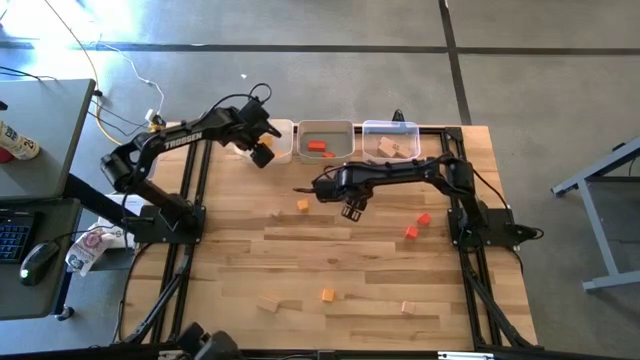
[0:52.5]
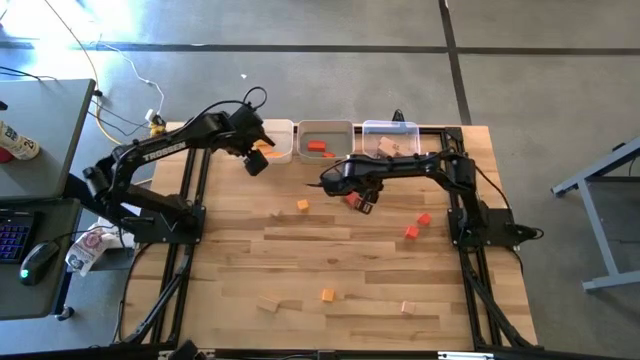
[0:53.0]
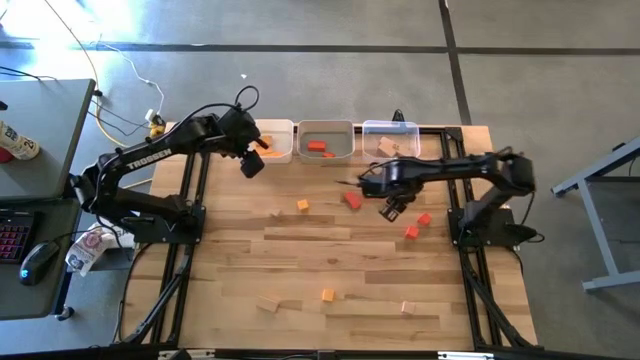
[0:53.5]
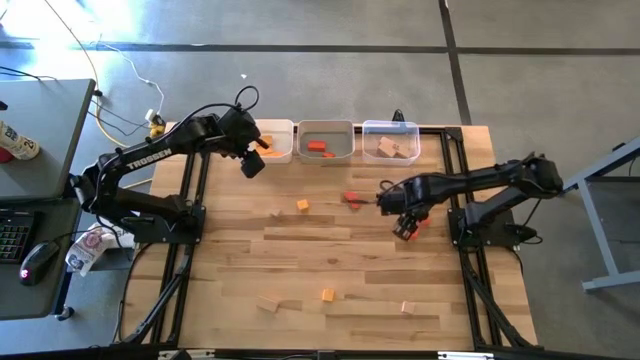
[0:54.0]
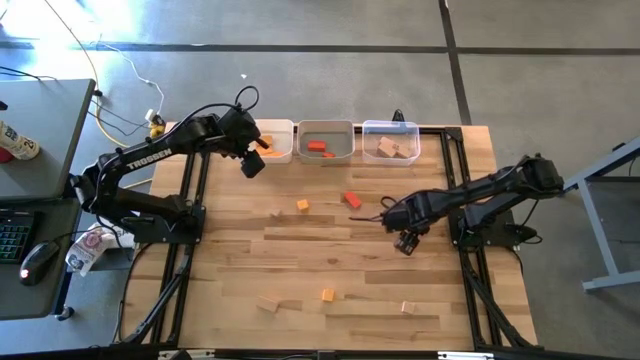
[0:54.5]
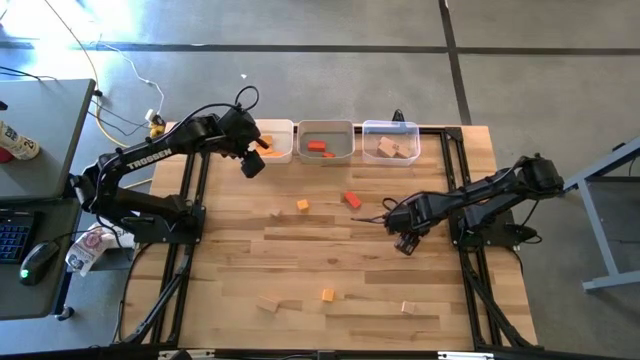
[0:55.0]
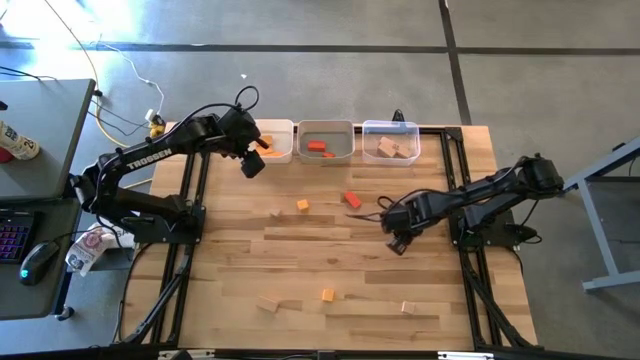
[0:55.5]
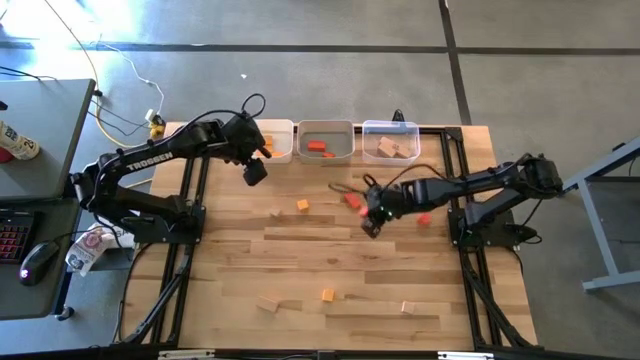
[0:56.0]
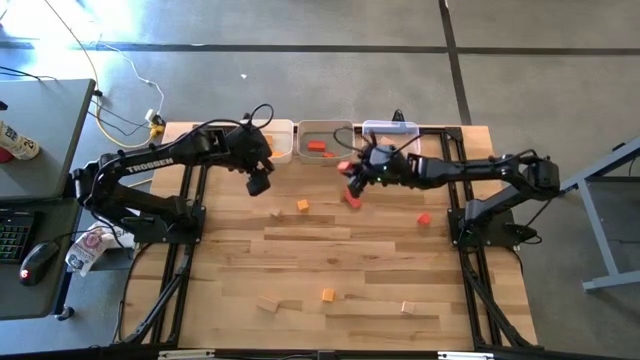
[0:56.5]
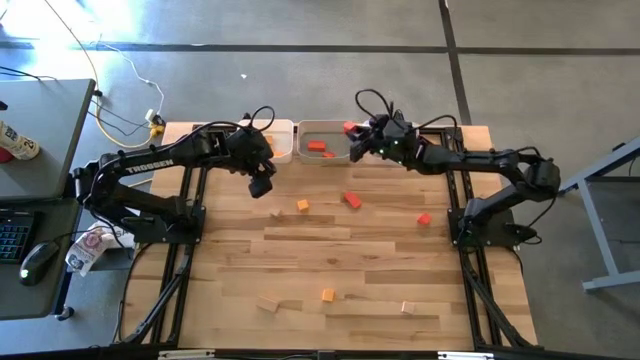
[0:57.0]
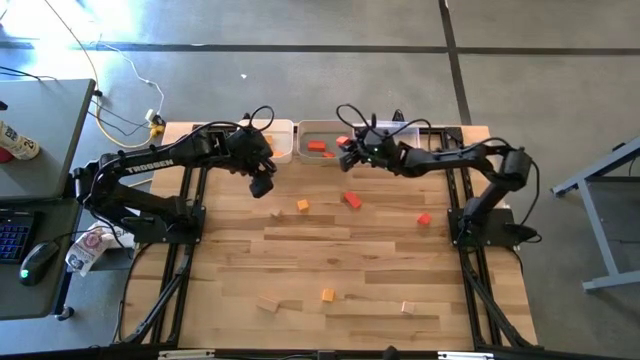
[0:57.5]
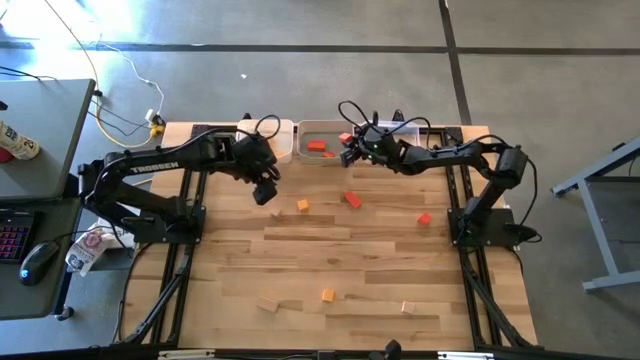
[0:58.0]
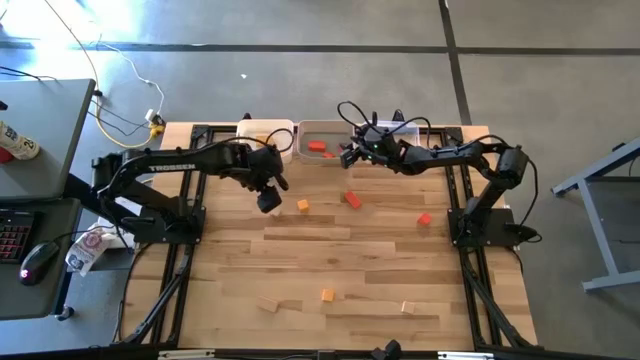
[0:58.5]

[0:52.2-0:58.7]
Task: Sort & place blocks by color
Put the orange block into the gray bin

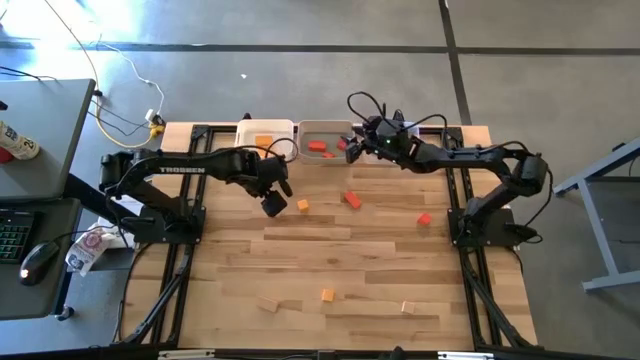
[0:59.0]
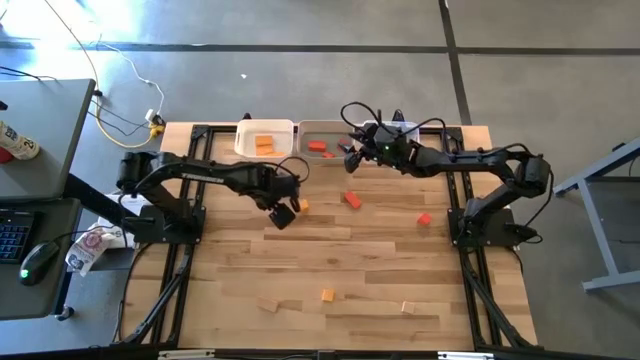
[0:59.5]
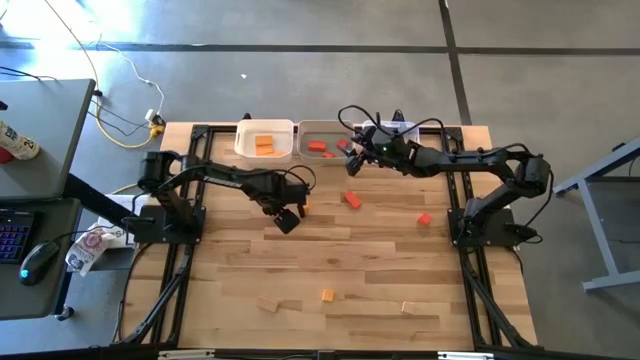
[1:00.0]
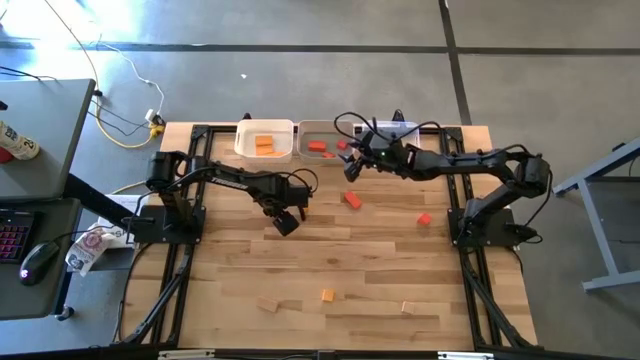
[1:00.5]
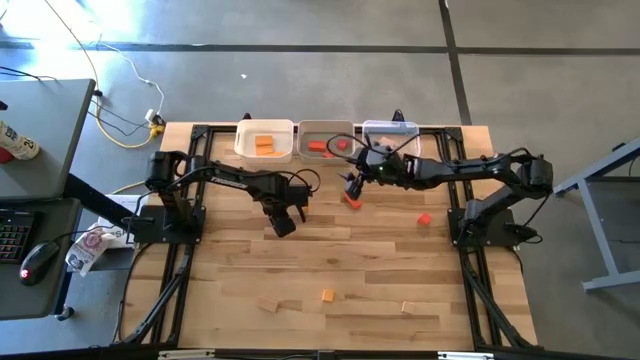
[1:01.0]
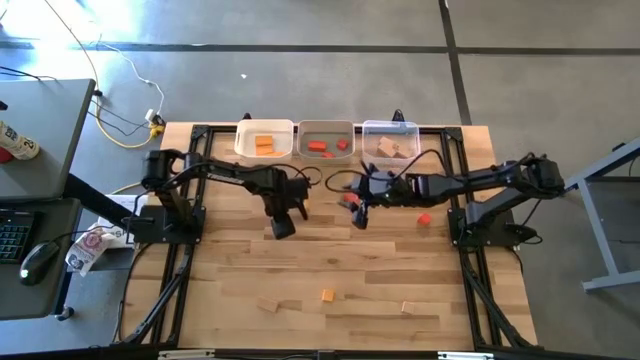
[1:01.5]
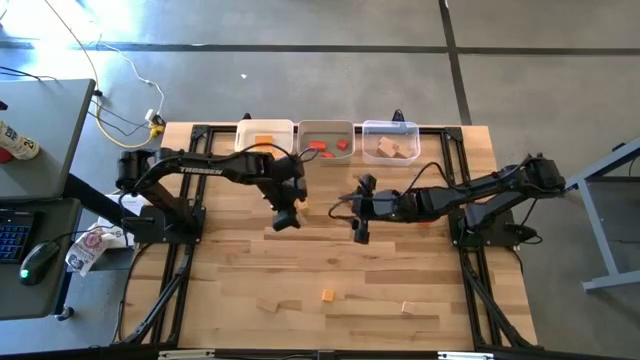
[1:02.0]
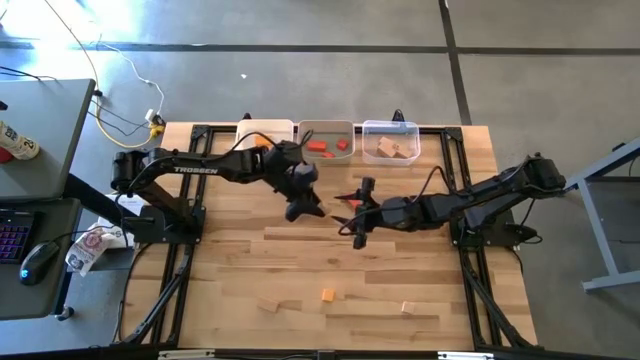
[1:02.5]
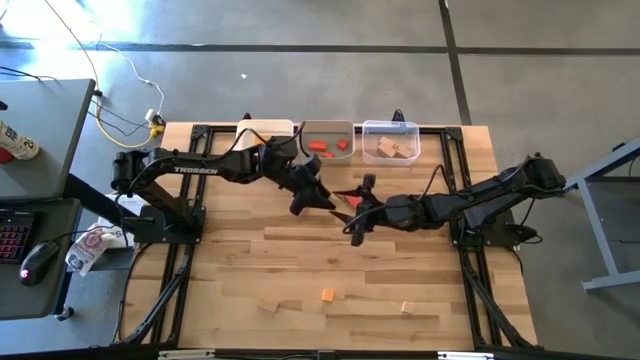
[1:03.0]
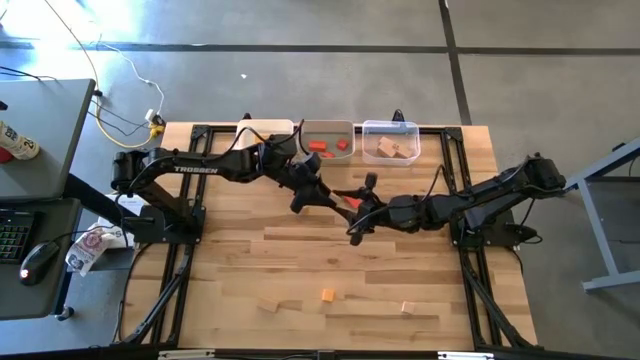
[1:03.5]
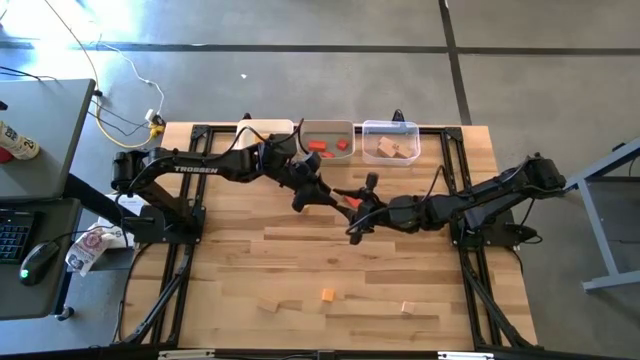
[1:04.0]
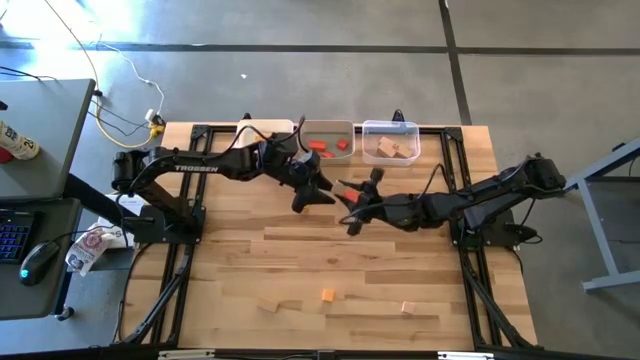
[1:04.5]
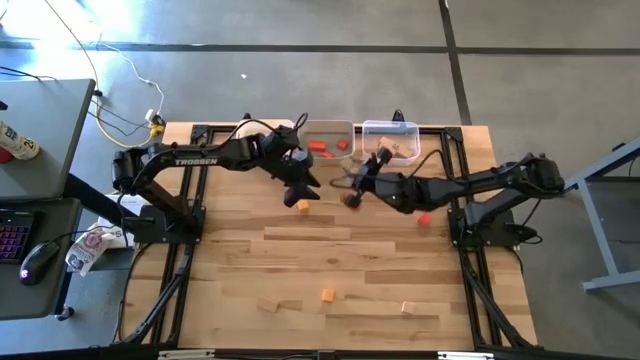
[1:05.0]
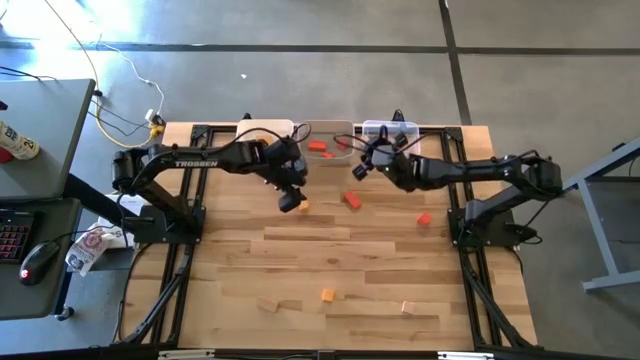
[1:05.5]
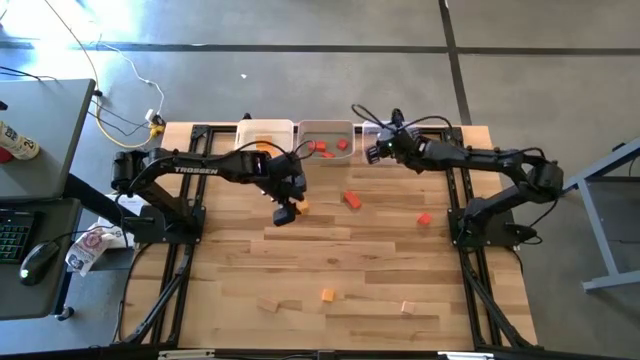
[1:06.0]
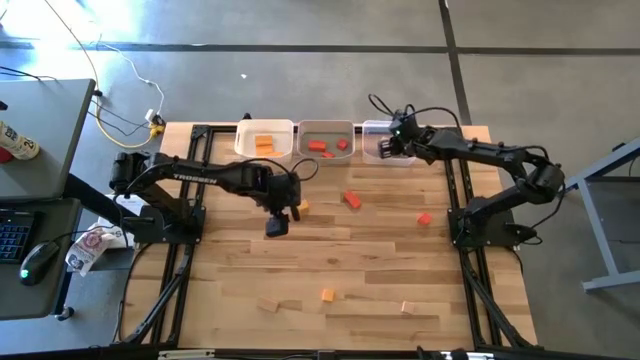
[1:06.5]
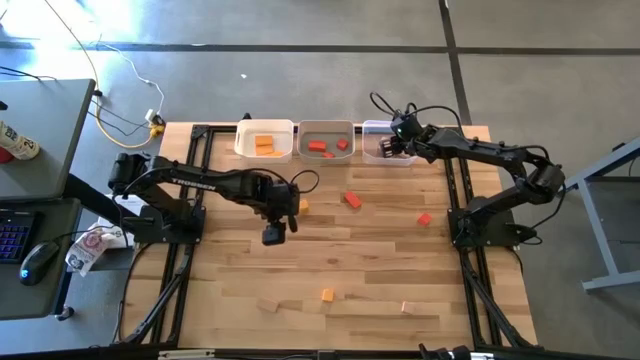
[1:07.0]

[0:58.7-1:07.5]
Put the brown block into the transparent bin

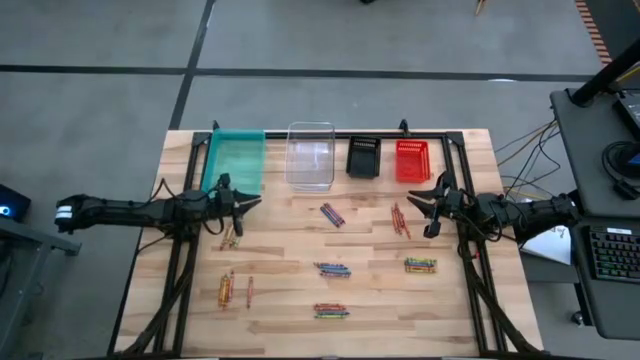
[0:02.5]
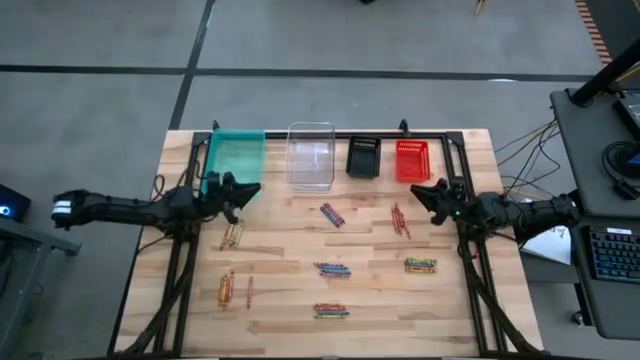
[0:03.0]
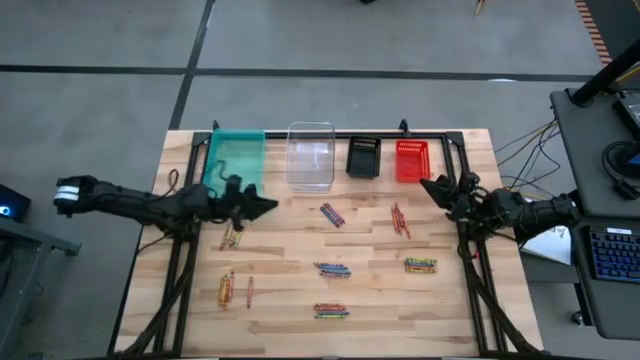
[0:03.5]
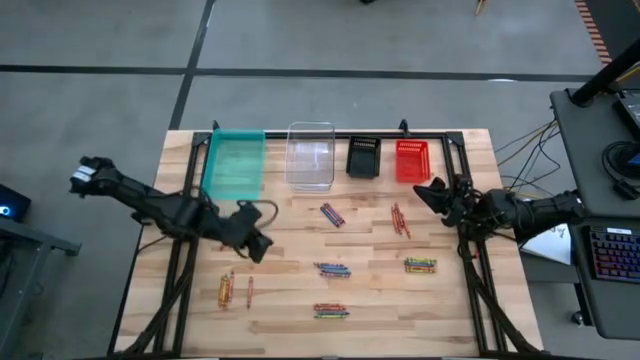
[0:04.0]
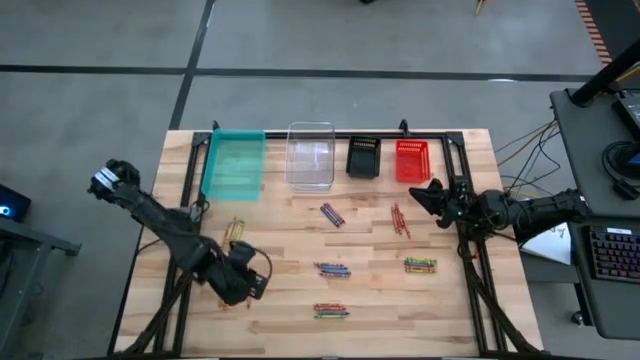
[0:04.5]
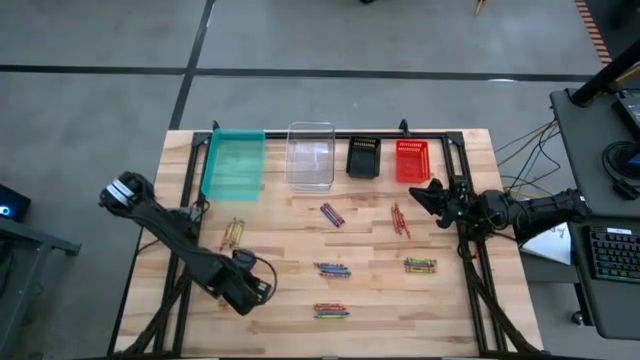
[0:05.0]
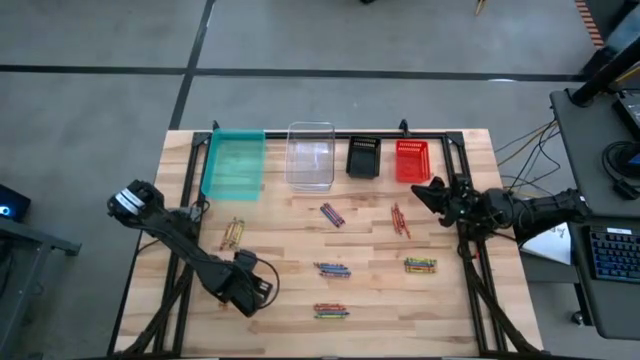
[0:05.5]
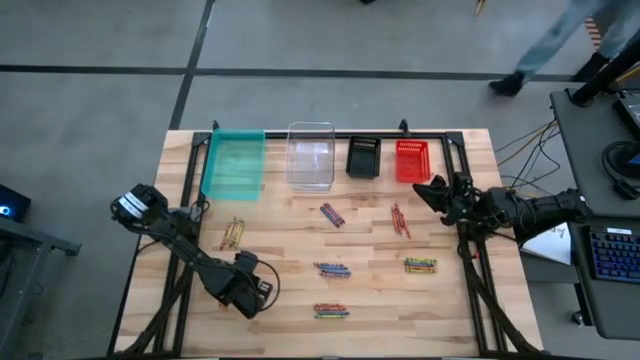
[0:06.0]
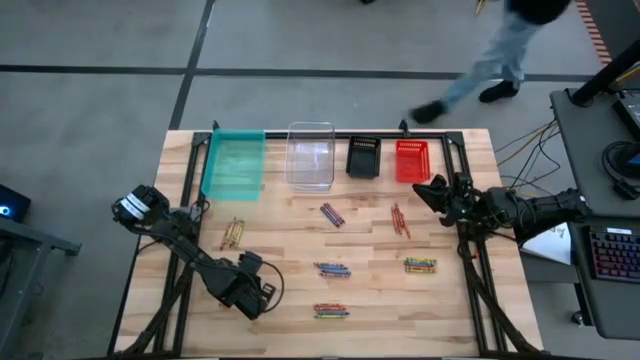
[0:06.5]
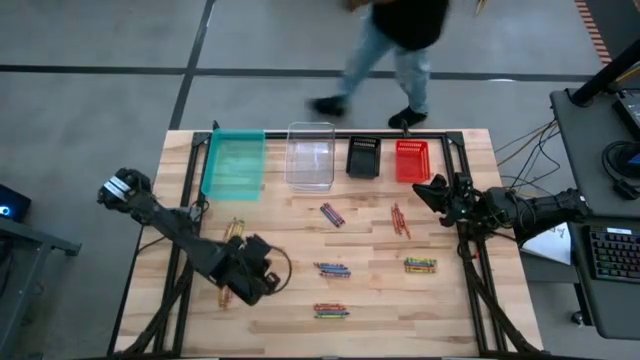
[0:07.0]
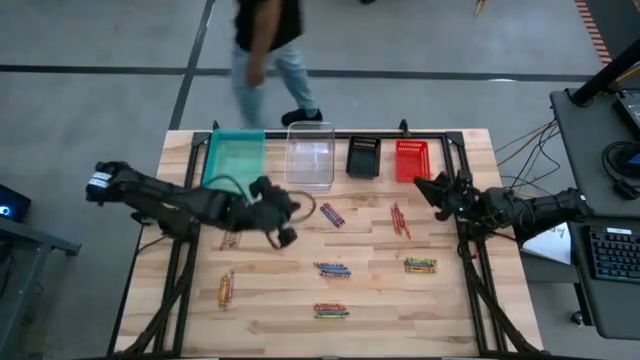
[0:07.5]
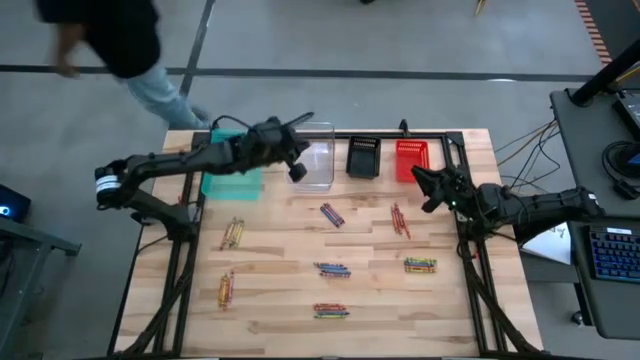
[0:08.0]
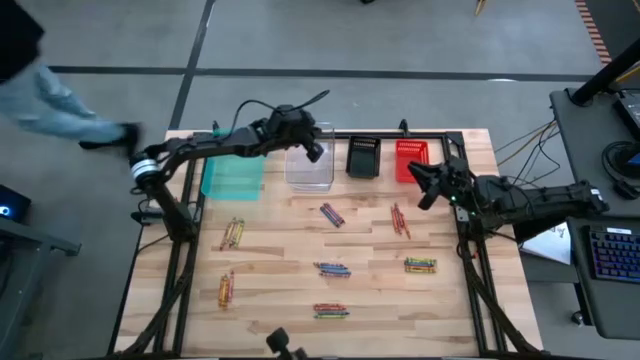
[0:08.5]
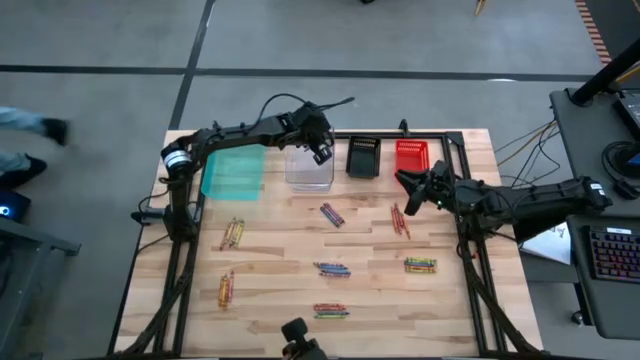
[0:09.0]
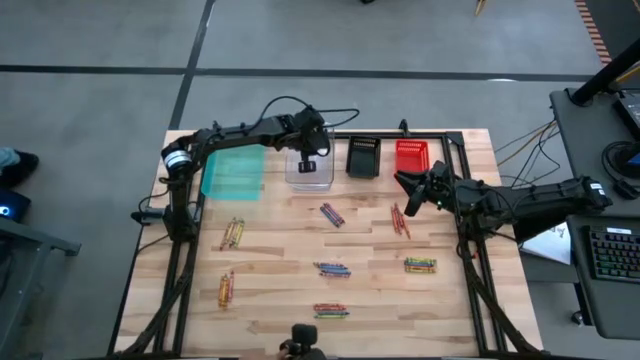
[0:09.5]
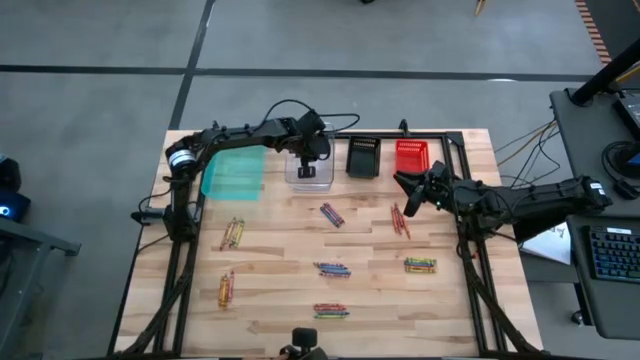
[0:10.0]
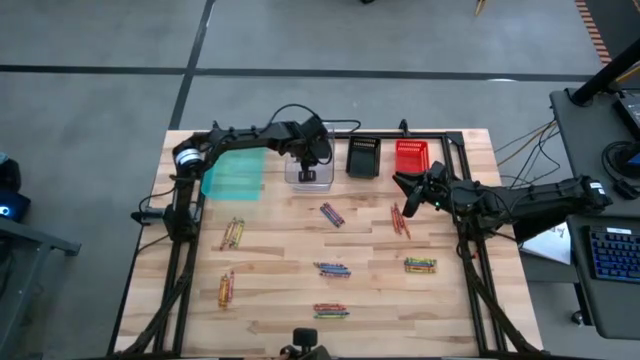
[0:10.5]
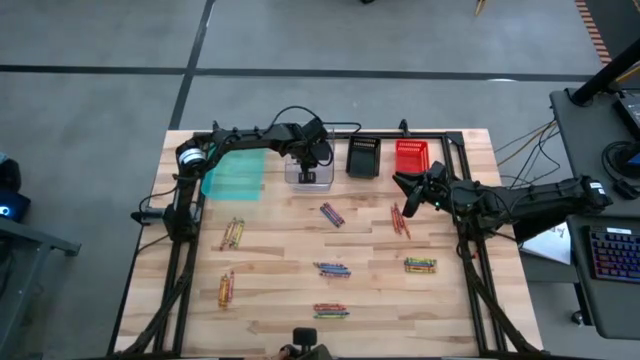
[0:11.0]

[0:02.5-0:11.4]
Task: Sort crayons
Put the red crayon into the transparent bin
